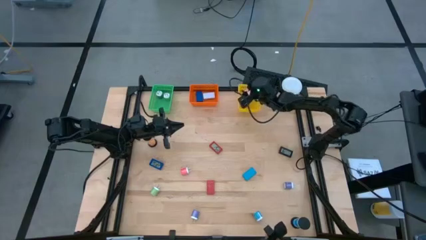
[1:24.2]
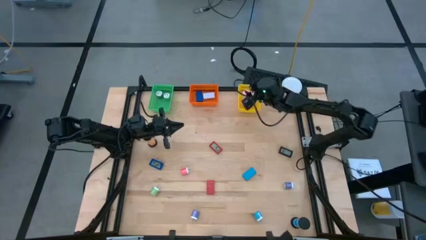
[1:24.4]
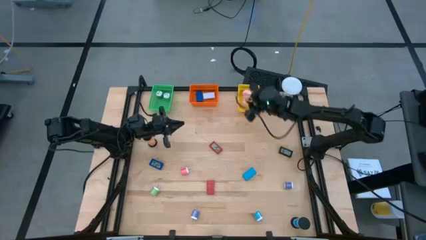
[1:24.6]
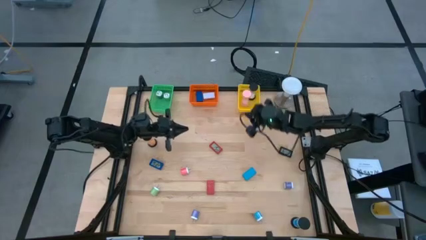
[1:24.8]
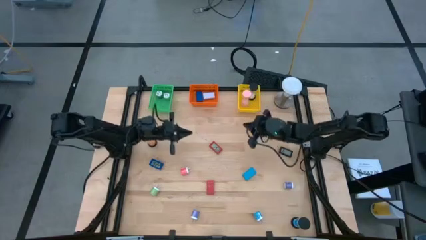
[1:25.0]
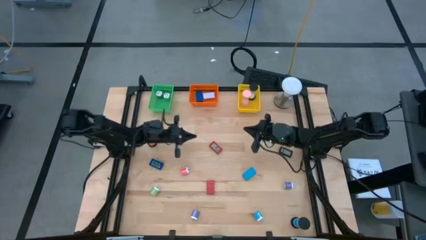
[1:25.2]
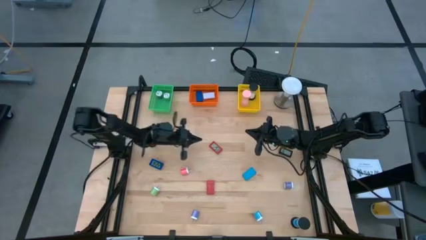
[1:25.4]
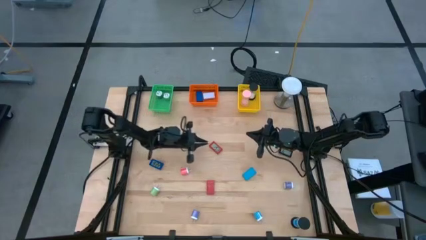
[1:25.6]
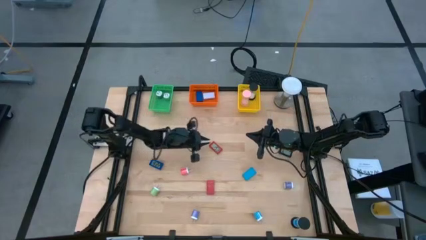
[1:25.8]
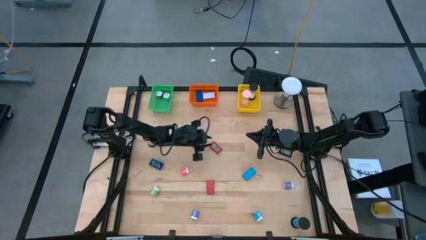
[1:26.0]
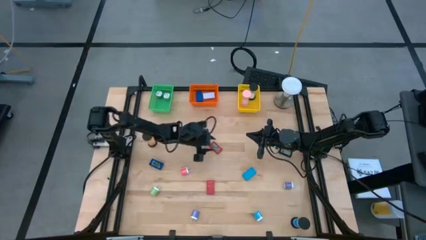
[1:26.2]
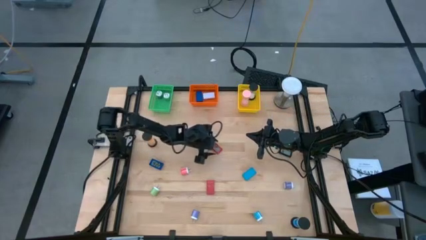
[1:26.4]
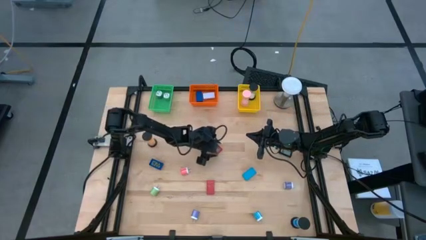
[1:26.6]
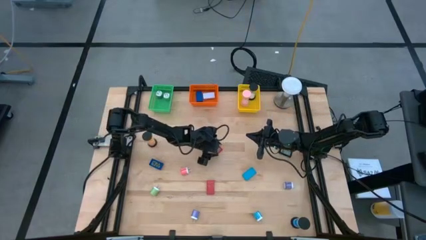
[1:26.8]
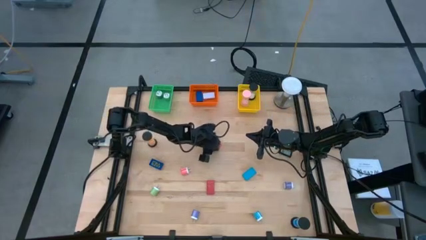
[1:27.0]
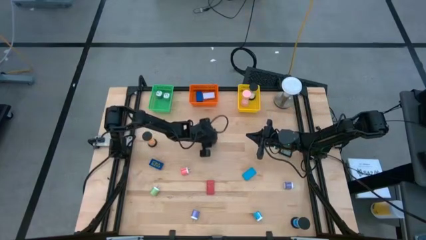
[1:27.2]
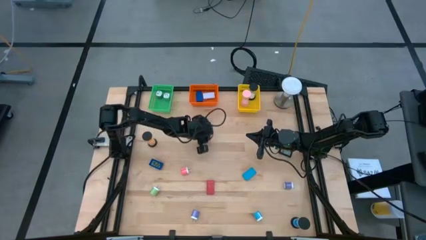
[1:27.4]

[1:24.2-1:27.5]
Task: Pick & Place Office items
Put the top red digital clock into the orange bin

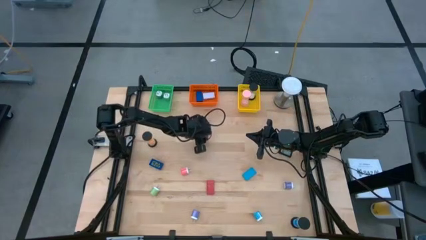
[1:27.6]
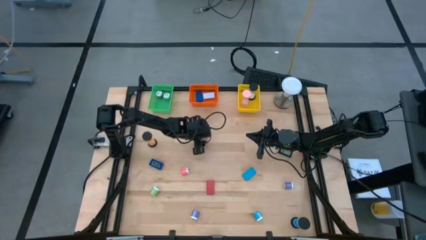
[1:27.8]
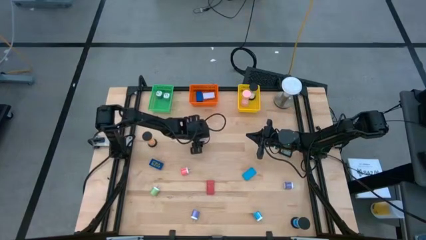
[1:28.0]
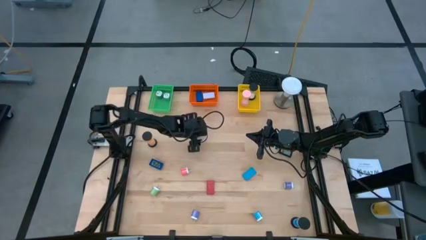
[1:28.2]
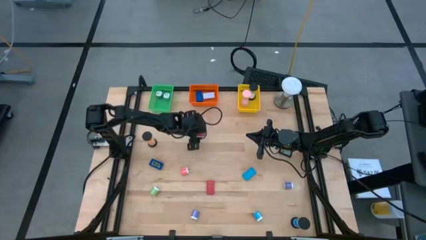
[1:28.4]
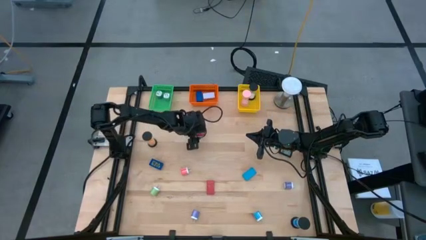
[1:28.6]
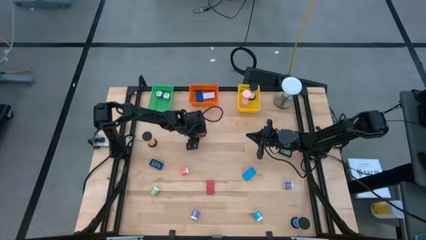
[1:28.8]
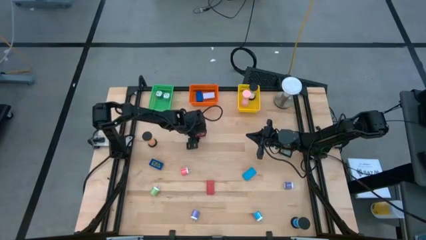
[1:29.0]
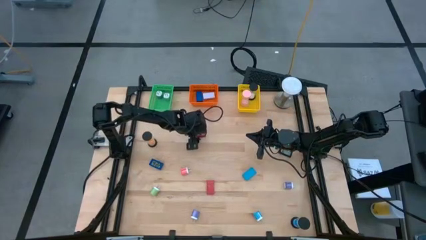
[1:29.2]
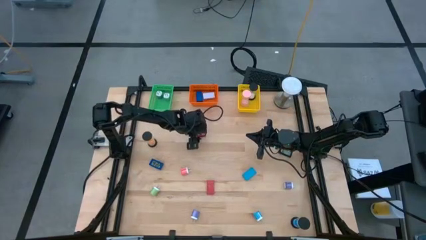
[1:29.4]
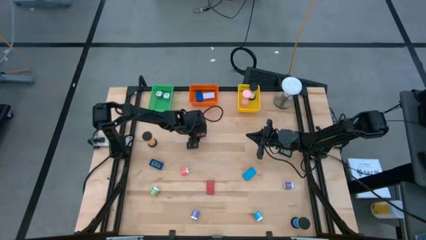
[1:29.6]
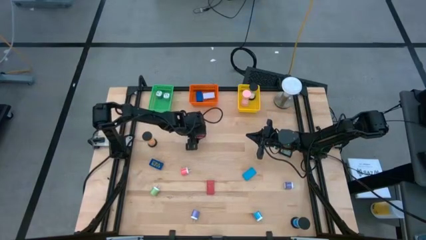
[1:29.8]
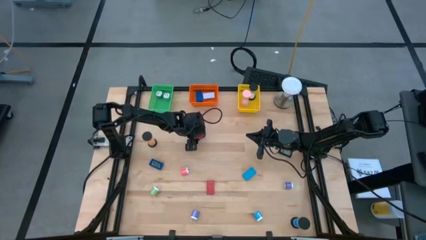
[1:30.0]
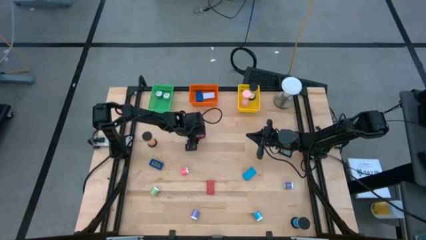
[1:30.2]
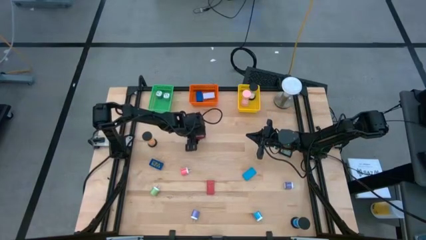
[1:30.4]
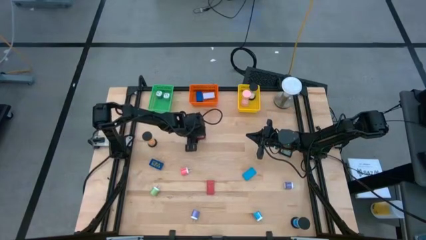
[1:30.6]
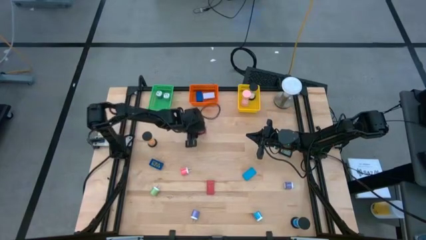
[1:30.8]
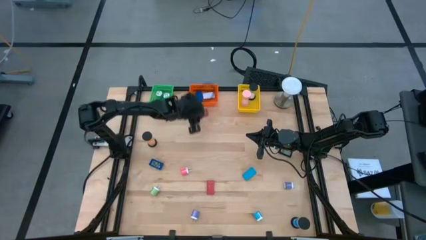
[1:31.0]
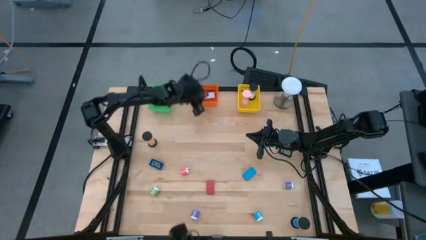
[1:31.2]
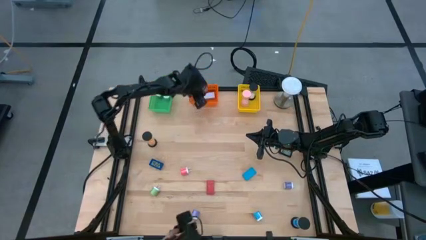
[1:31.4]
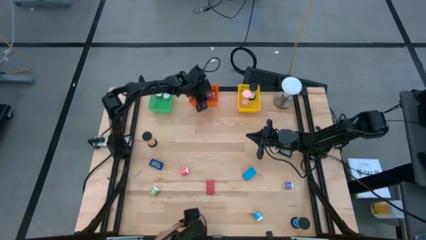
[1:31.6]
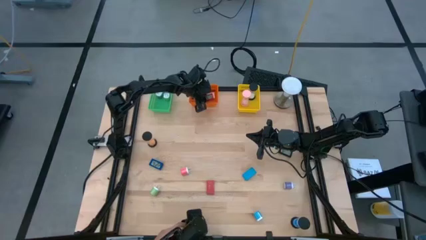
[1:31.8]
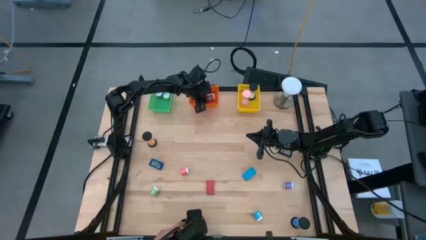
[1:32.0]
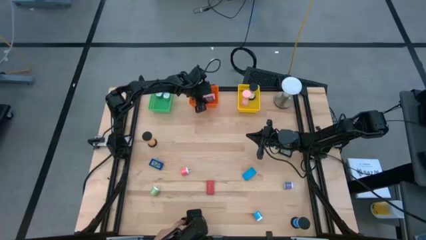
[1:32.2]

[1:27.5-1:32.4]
Put the top red digital clock into the orange bin

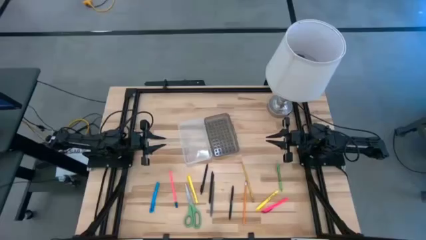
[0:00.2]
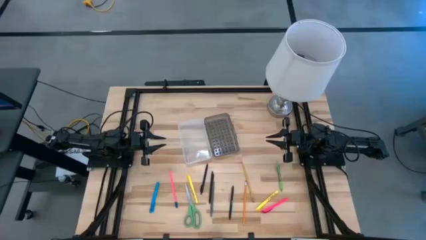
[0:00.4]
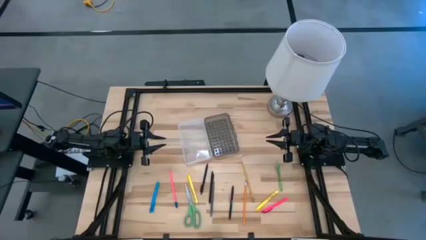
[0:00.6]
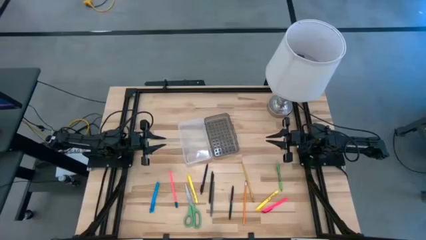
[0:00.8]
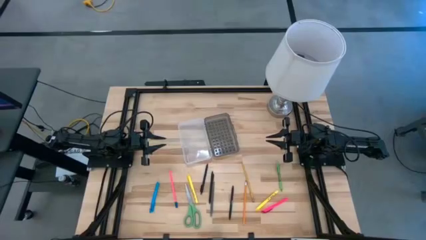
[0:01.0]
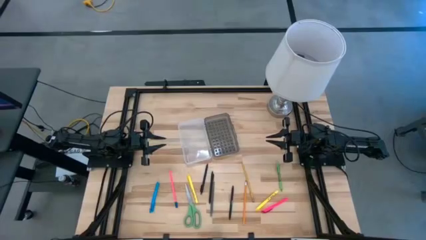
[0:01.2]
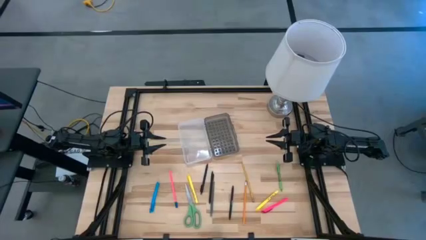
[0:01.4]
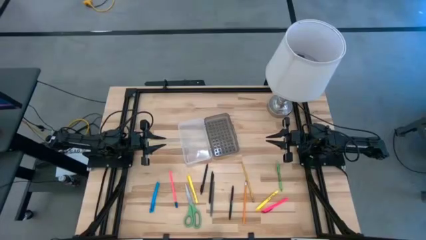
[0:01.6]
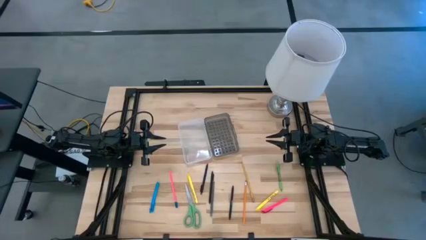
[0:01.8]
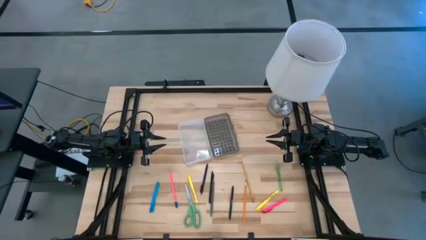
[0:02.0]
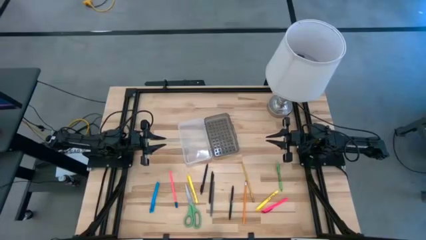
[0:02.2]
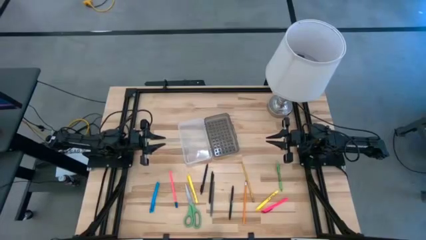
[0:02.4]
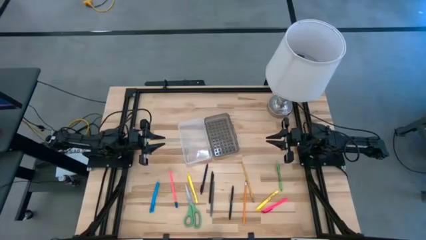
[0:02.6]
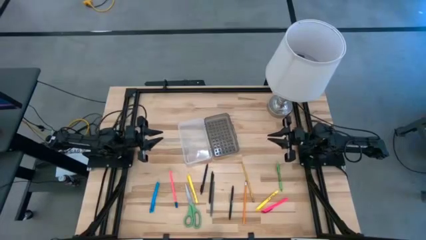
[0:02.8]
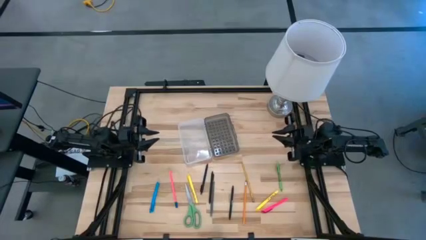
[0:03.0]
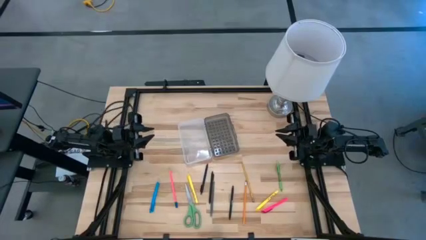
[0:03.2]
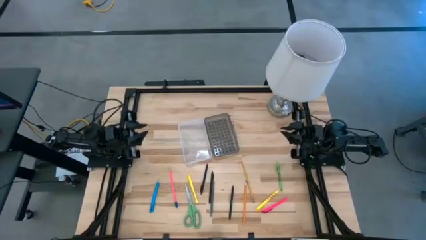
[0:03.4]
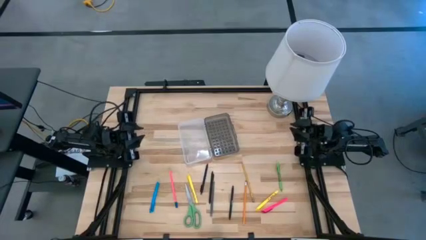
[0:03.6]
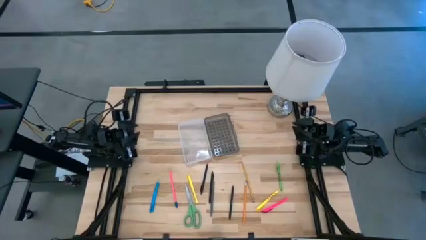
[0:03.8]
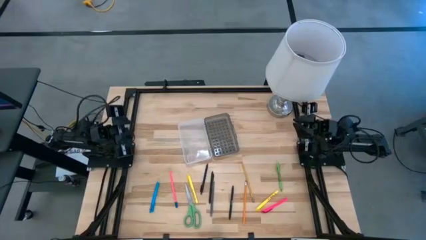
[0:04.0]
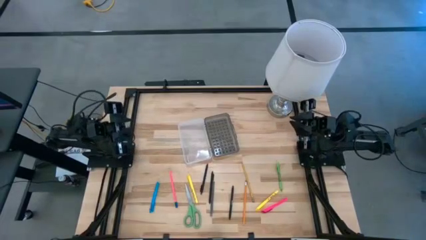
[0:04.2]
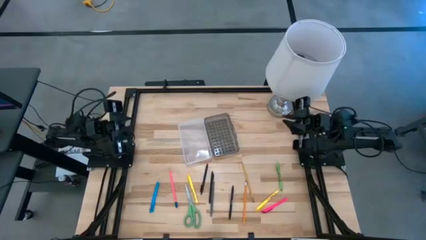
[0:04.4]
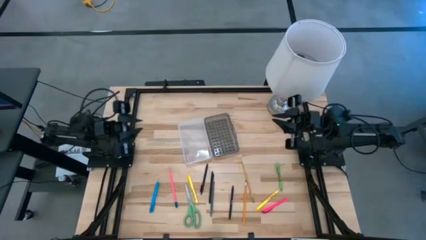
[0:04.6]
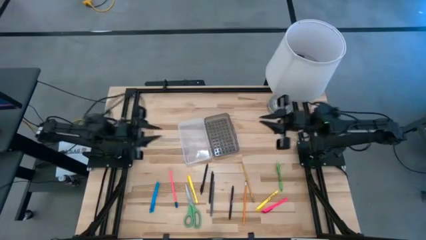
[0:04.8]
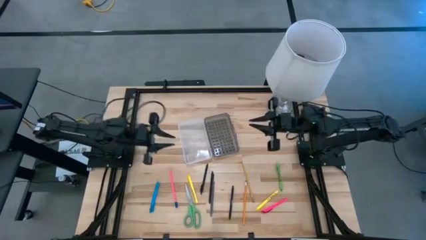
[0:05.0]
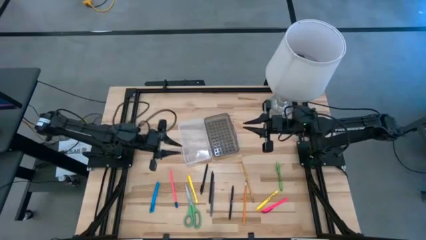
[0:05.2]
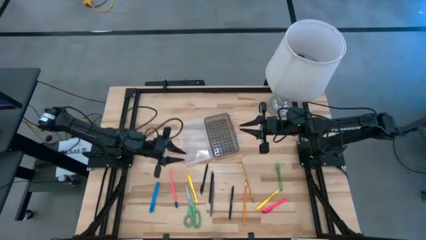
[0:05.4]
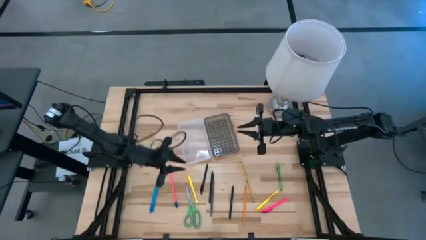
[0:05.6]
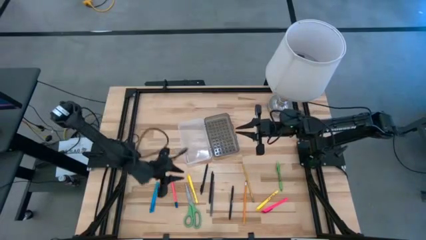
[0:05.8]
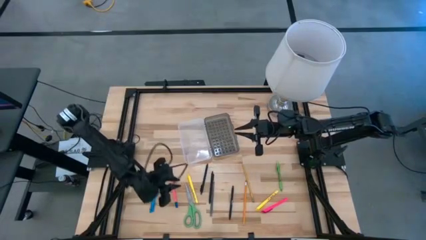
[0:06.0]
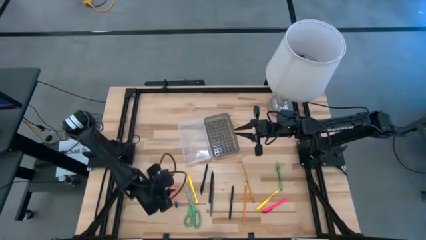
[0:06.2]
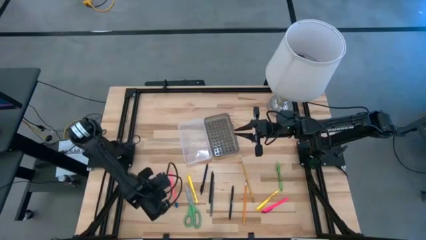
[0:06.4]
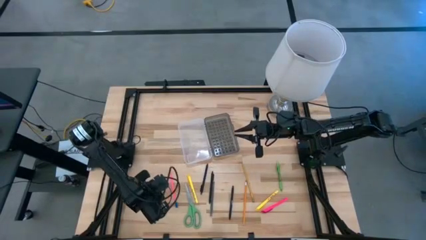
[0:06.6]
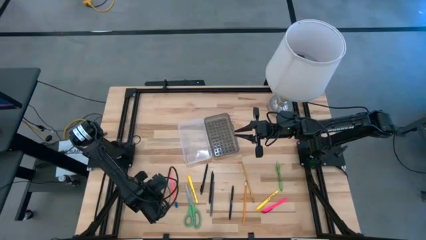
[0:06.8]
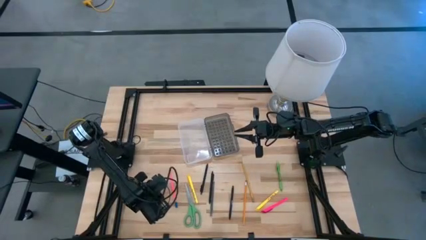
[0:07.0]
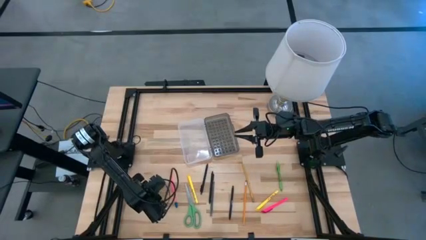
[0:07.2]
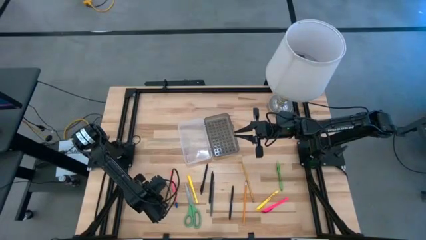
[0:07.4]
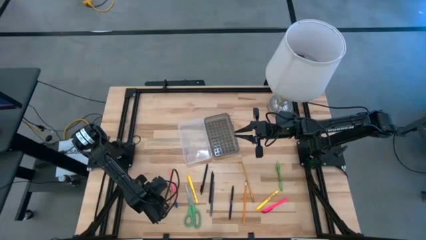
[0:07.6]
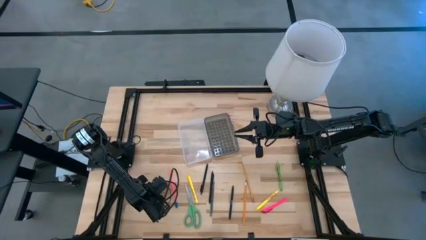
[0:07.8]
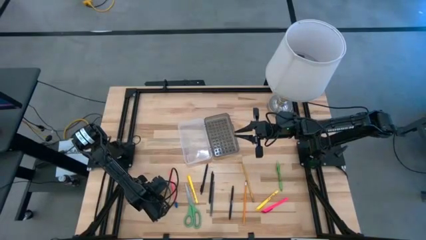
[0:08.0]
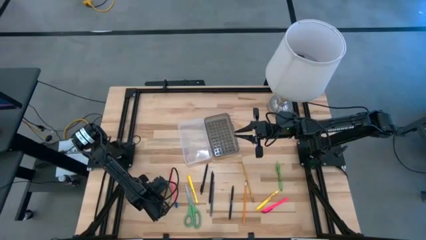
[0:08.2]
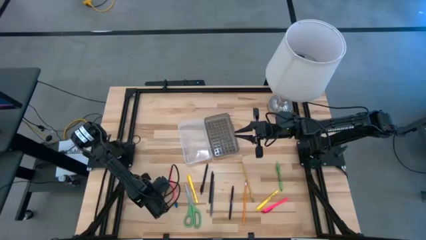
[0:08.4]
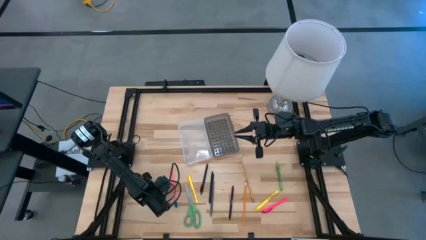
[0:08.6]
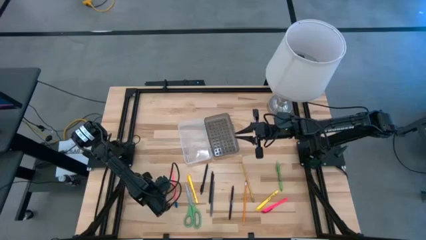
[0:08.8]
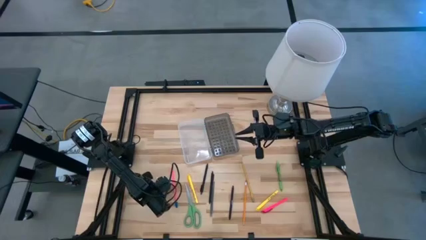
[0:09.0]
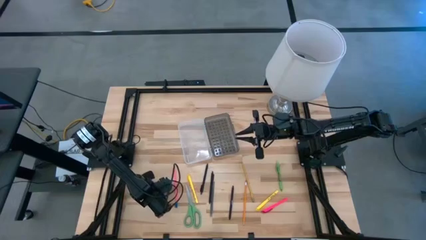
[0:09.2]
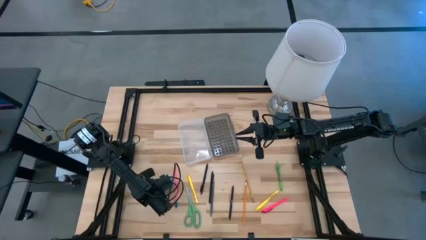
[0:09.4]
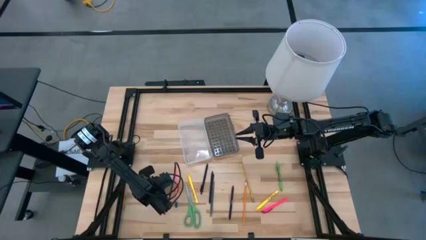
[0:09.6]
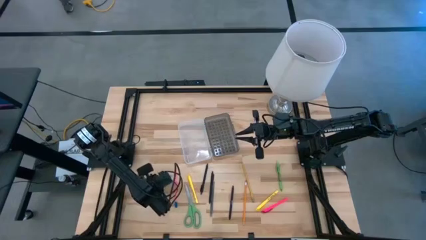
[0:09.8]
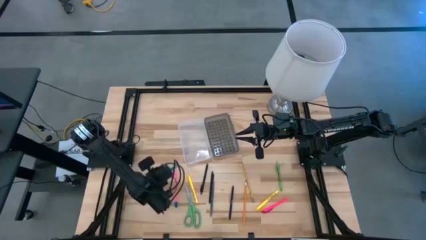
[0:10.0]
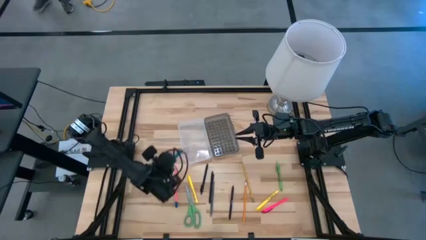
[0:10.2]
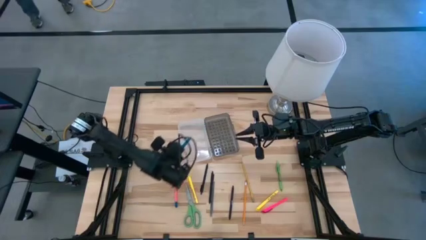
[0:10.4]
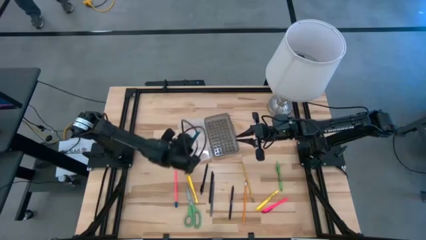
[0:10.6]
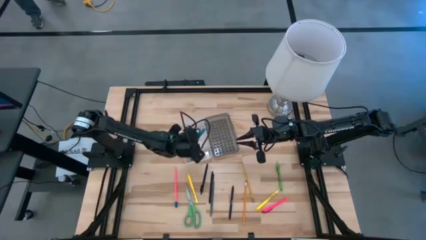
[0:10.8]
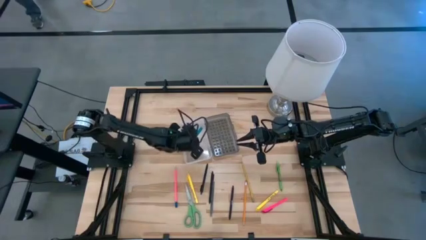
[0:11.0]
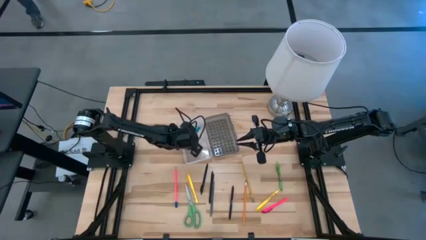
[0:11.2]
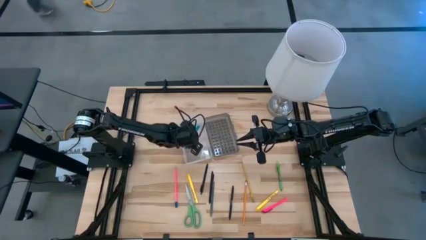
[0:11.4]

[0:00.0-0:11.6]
Task: Pick & place school supplies into a supply box
Put the blue pen into the black supply box
